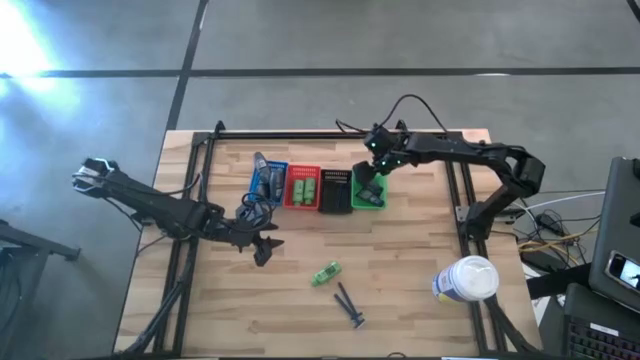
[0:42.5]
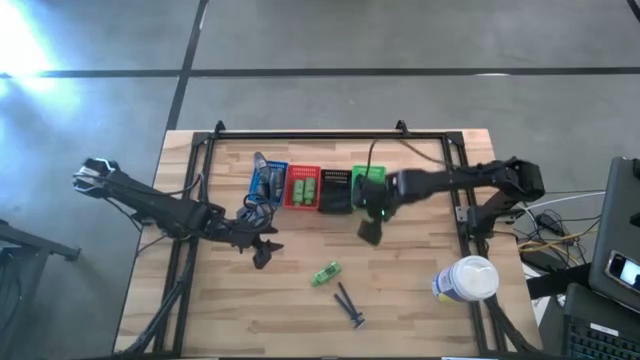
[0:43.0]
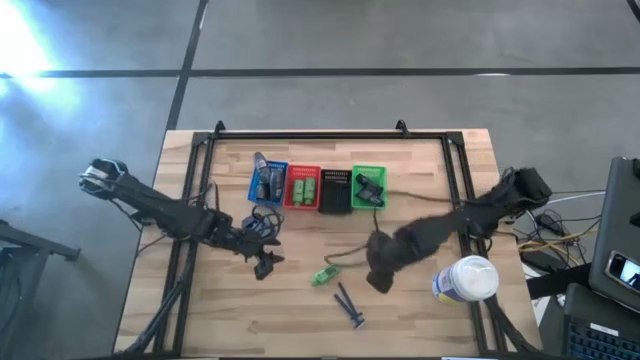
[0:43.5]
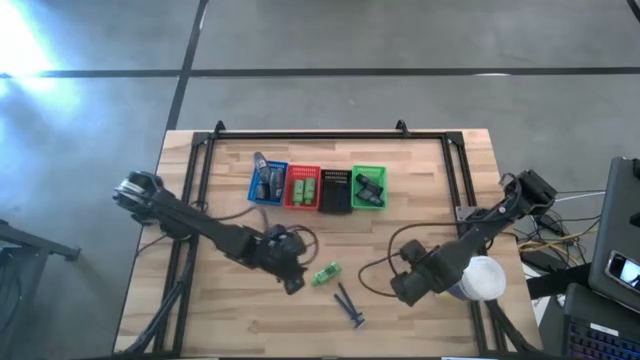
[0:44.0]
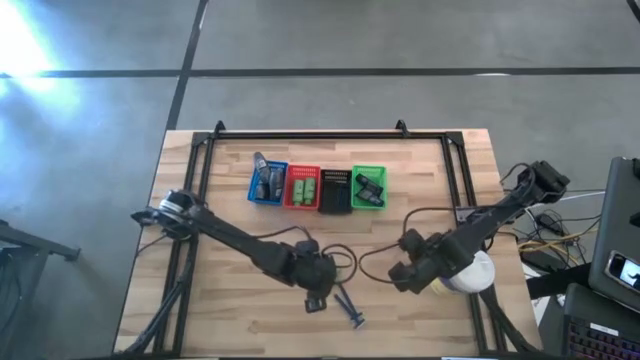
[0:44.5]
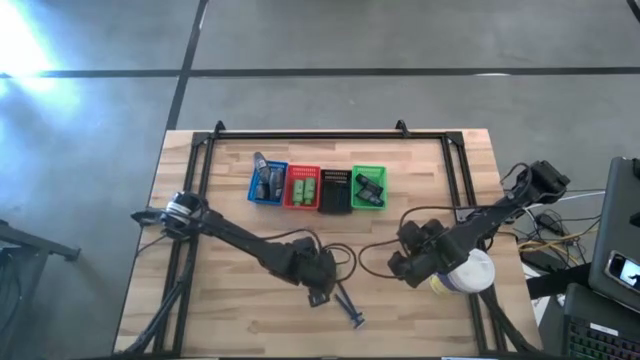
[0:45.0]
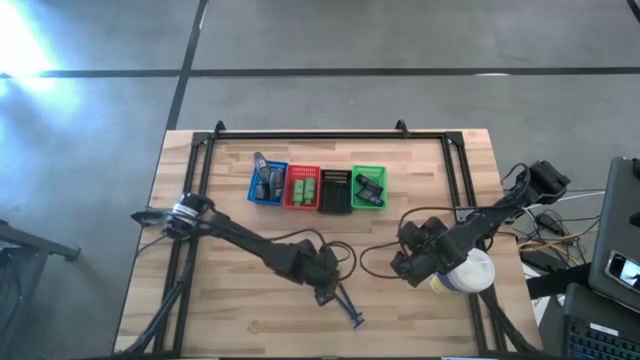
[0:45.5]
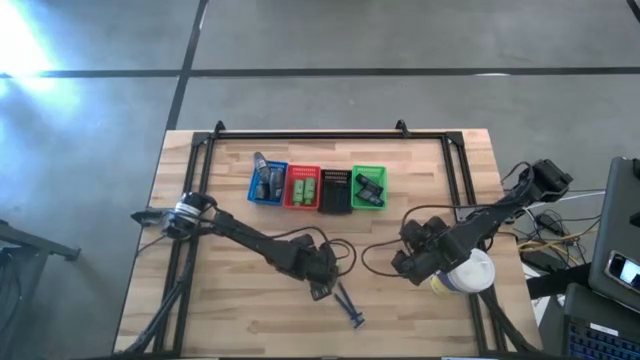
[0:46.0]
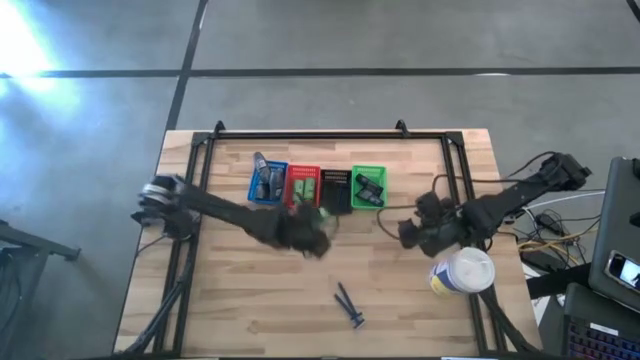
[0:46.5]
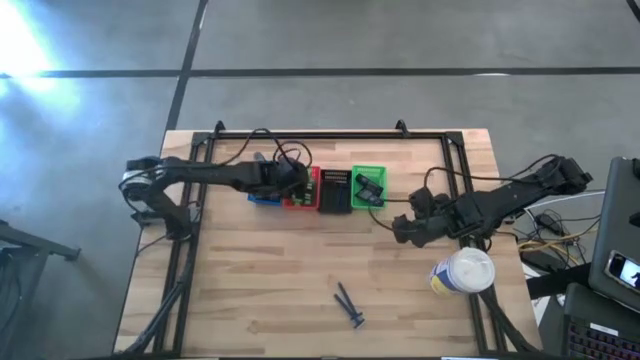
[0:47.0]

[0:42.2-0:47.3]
Task: Pick & Place Travel size toiletries
Put the shampoo into the red basket

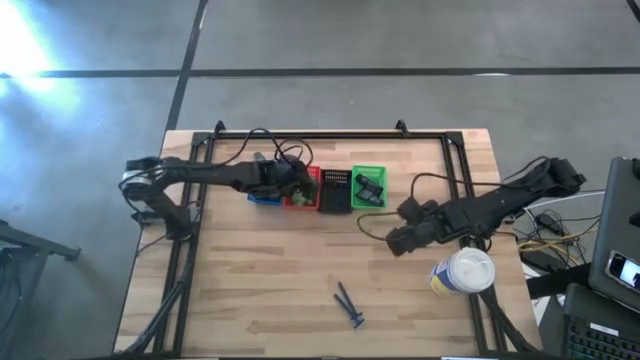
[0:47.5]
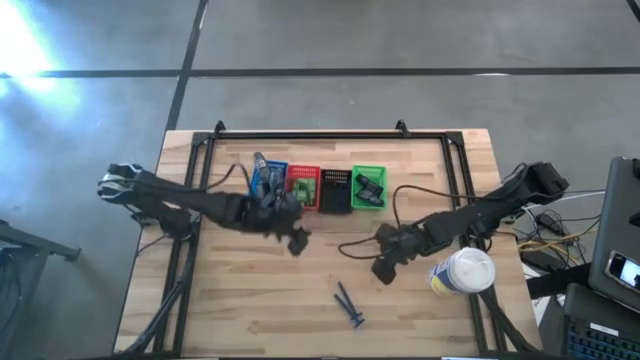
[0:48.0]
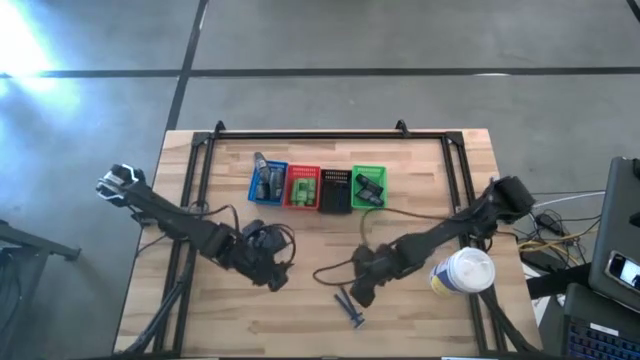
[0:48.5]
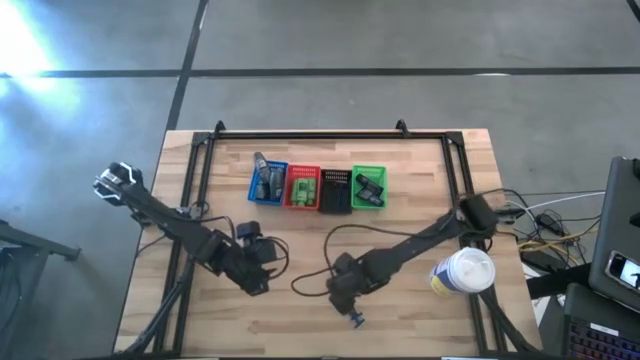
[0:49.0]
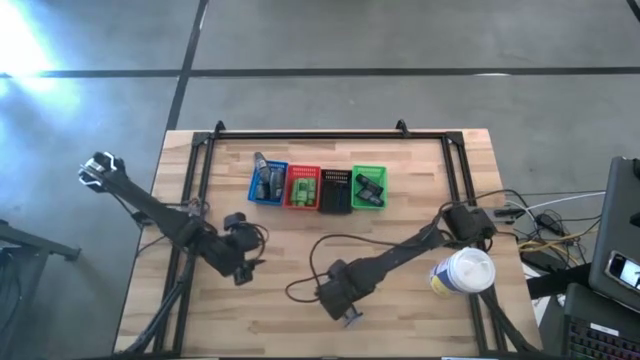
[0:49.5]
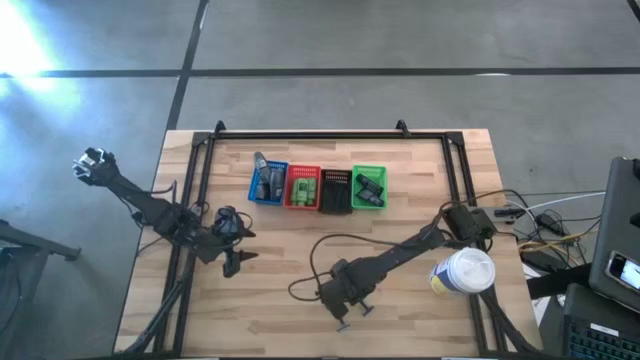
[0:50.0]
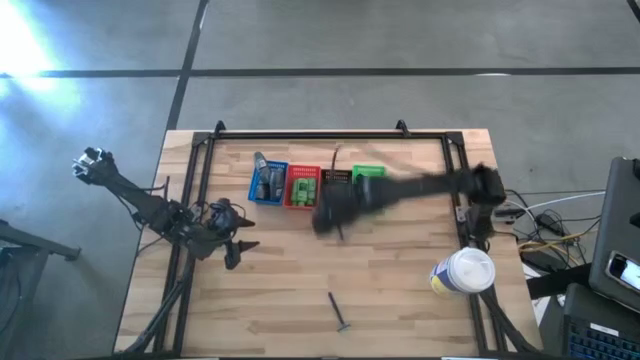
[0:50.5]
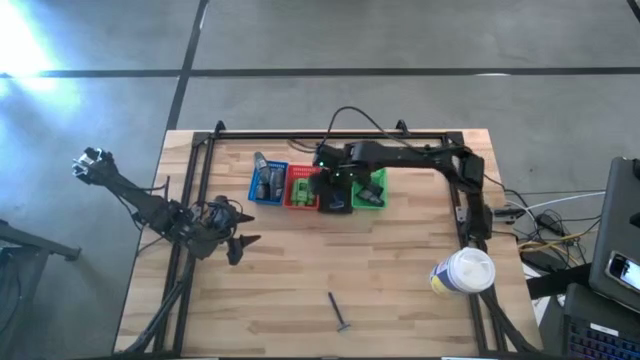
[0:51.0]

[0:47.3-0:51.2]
Put the top razor into the black basket

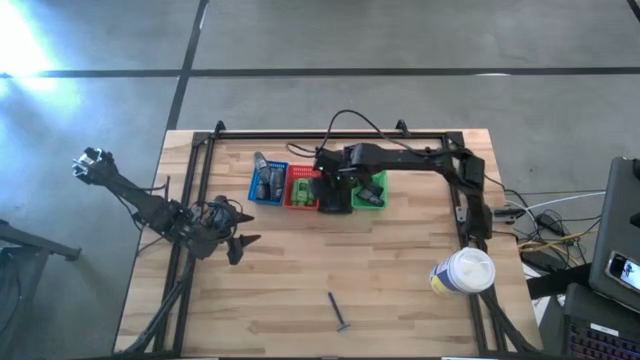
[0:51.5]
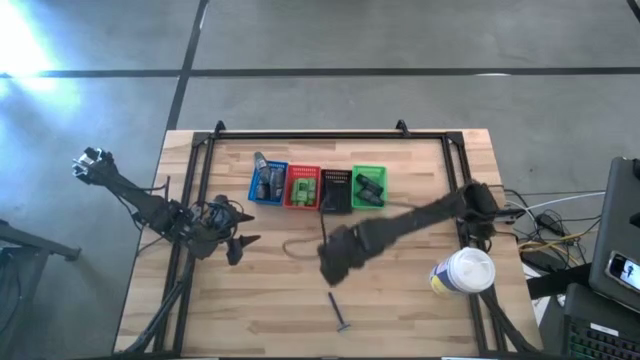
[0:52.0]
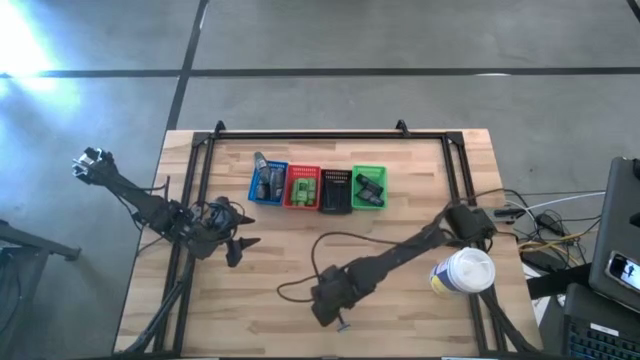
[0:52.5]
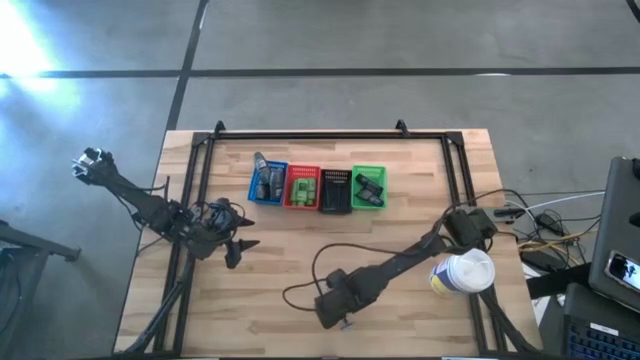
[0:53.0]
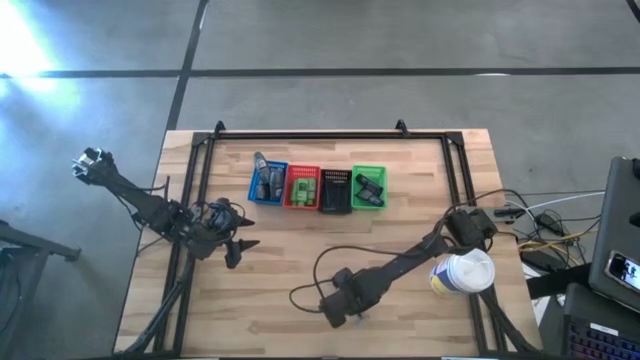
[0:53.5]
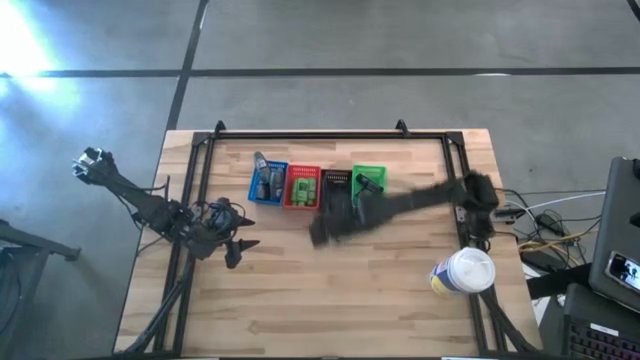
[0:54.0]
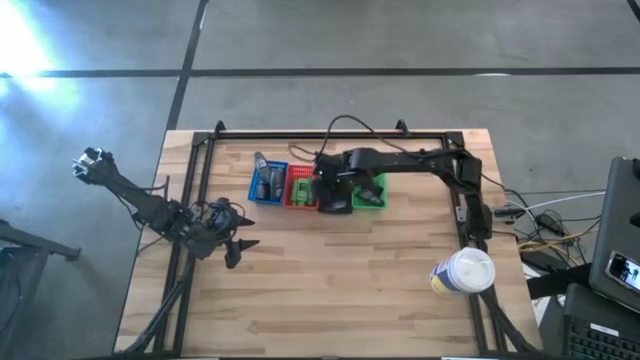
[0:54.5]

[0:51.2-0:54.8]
Put the razor into the black basket

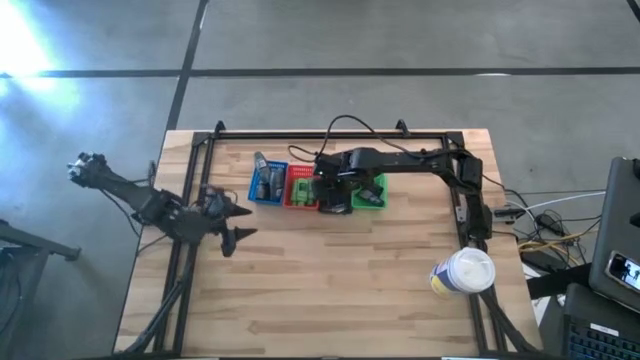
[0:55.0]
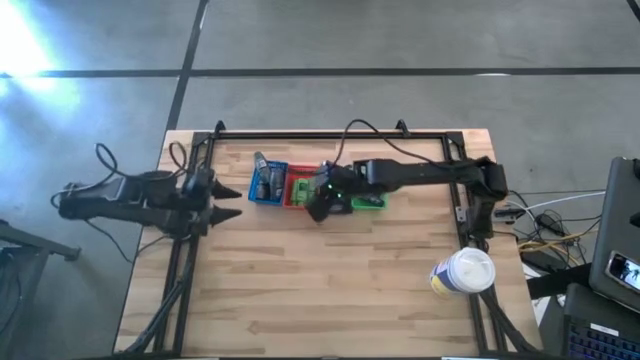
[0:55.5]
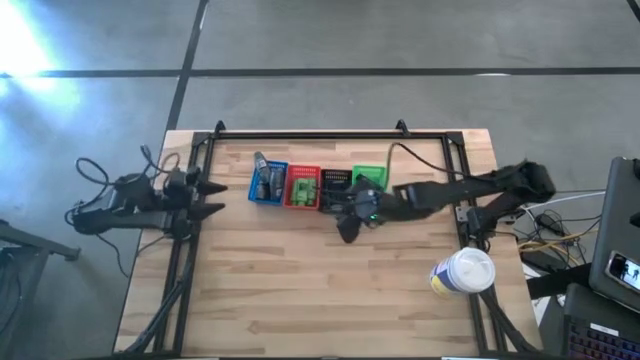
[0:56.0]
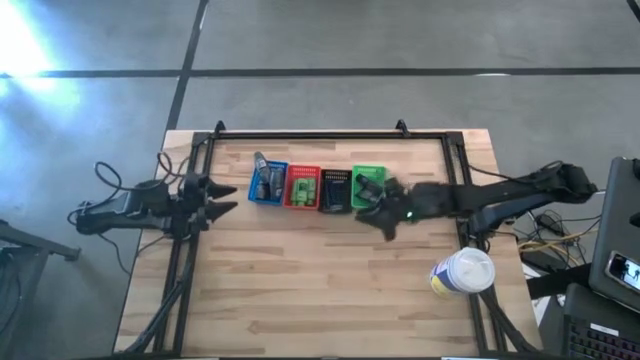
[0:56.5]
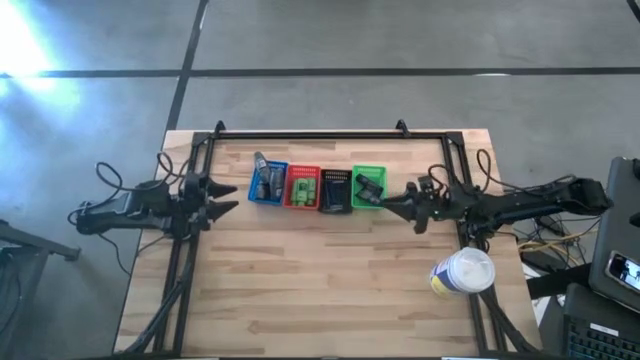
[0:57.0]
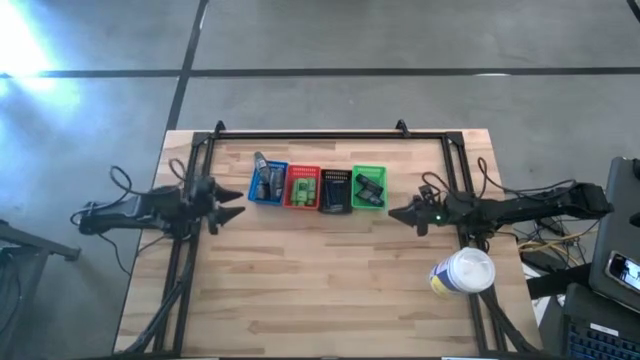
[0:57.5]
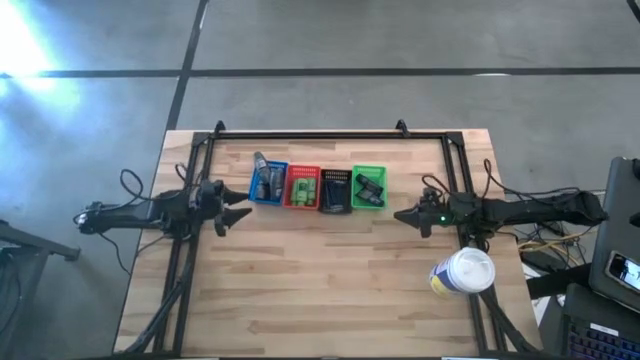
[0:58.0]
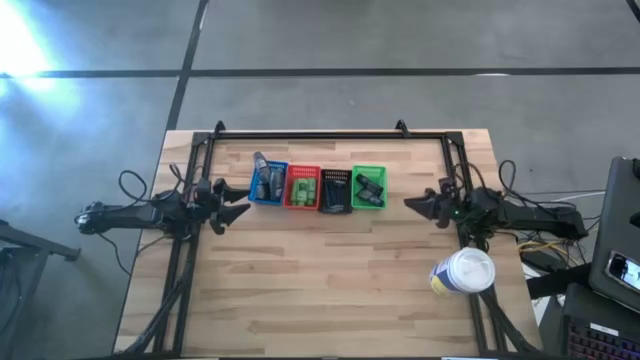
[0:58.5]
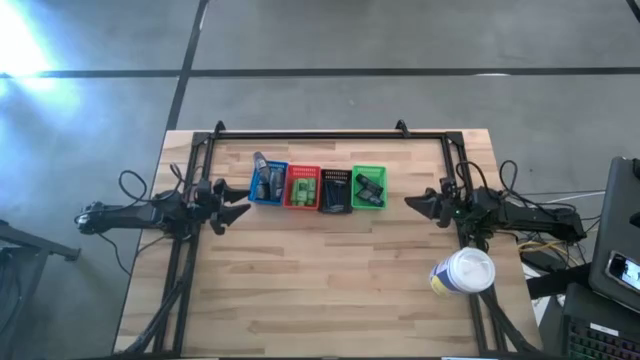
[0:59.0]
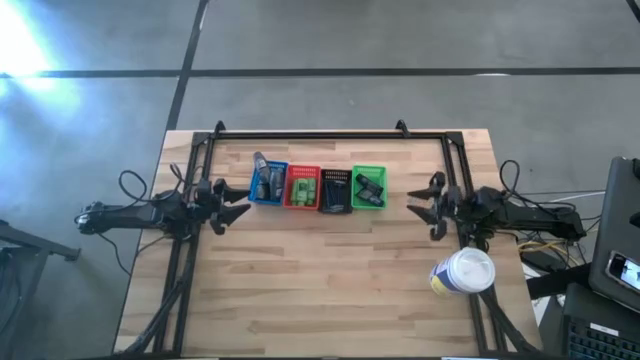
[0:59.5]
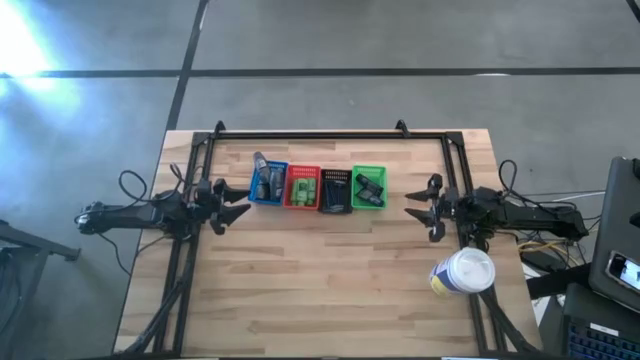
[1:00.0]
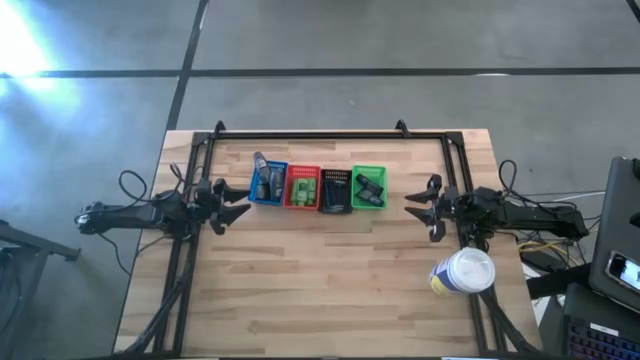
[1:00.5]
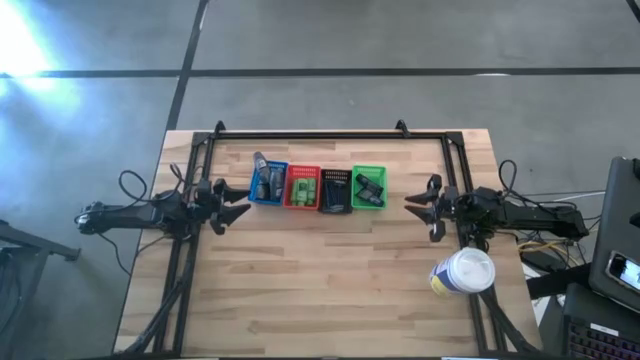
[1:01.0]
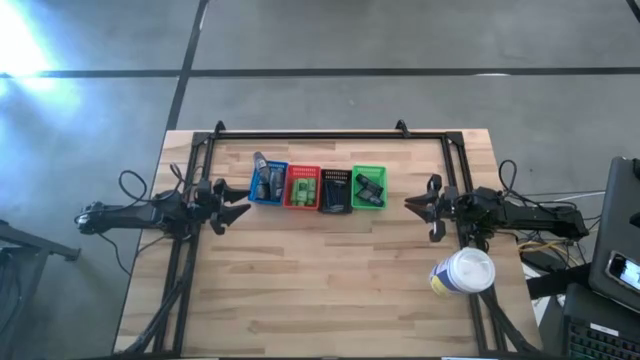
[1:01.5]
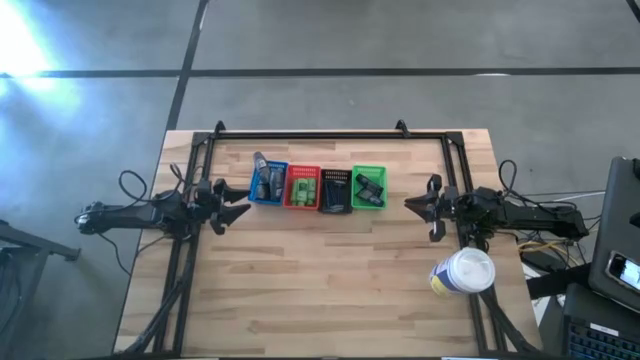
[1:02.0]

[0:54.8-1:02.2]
Return to Home Position

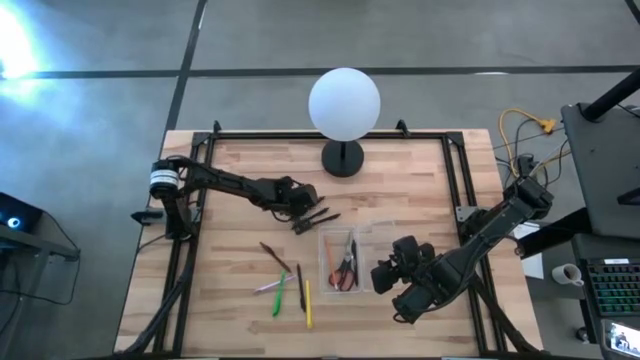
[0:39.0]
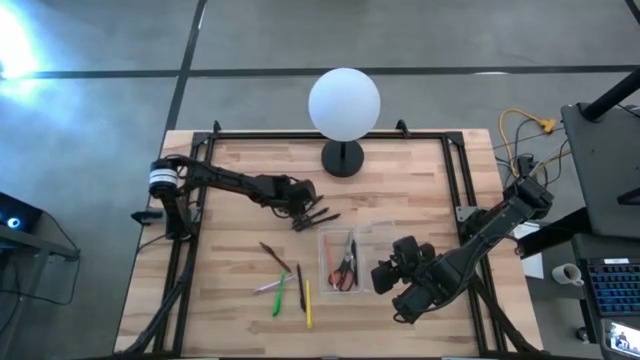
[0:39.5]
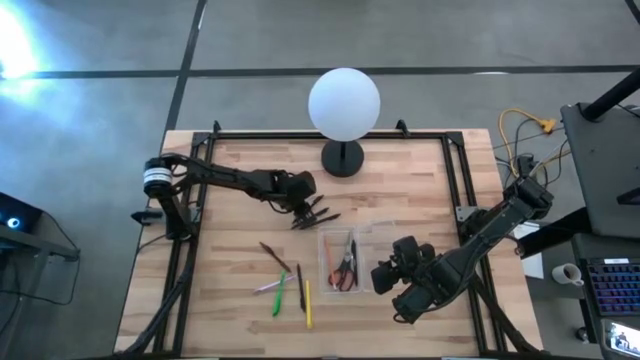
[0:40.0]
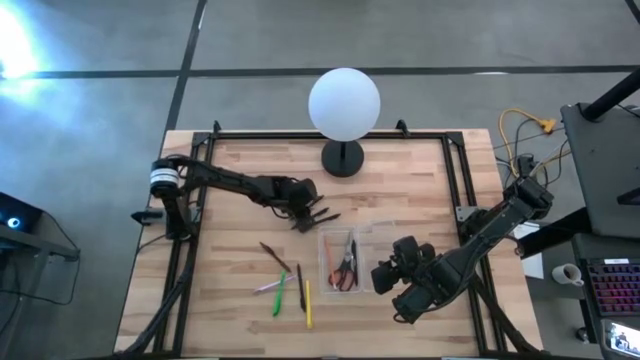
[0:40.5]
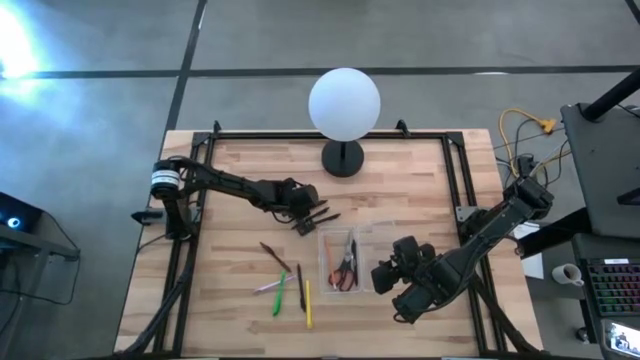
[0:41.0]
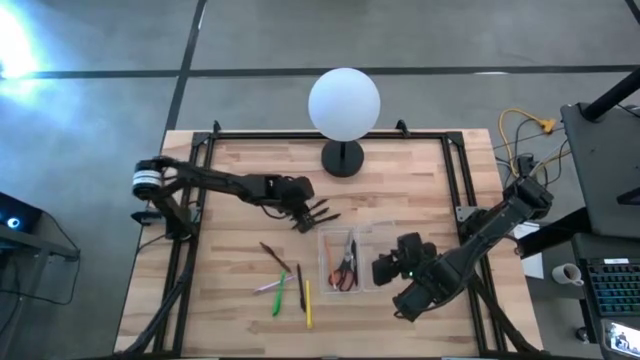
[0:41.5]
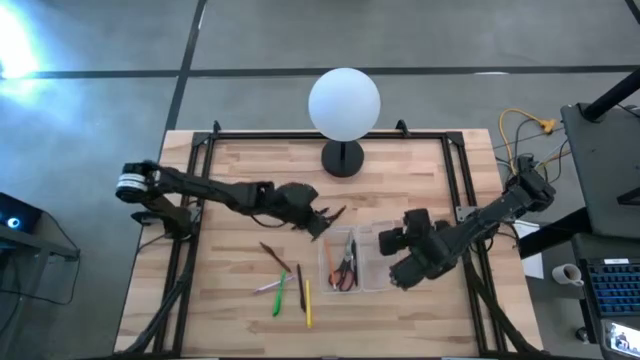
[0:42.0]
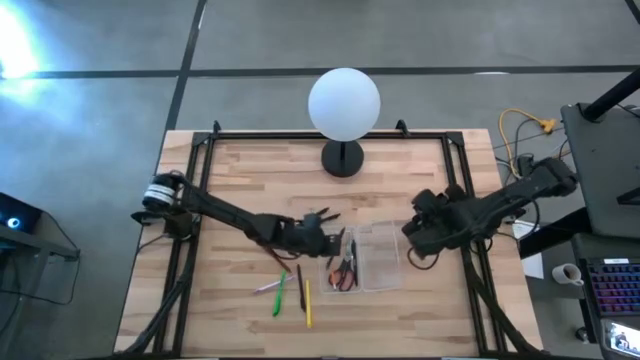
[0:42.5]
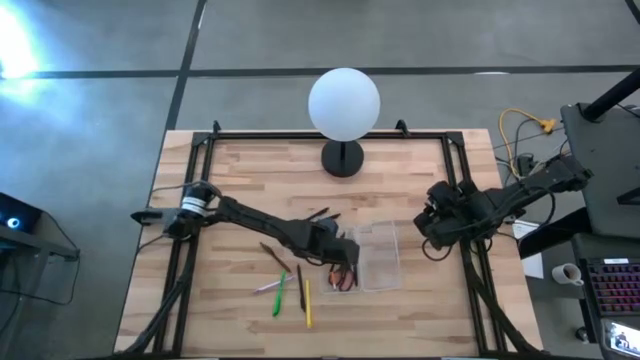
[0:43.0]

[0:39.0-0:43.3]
Task: Pick & place school supplies into a supply box
Put the black pen into the transparent supply box
